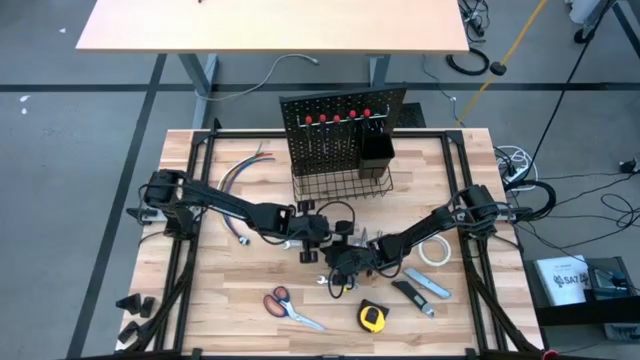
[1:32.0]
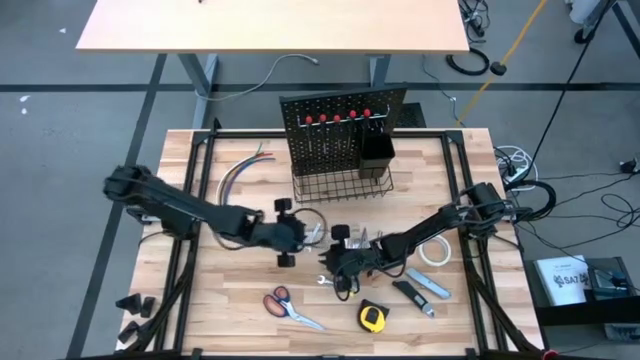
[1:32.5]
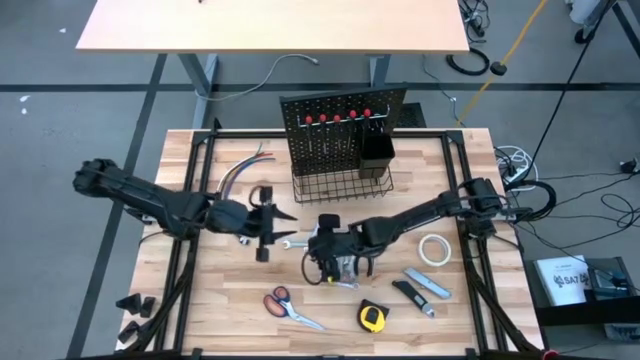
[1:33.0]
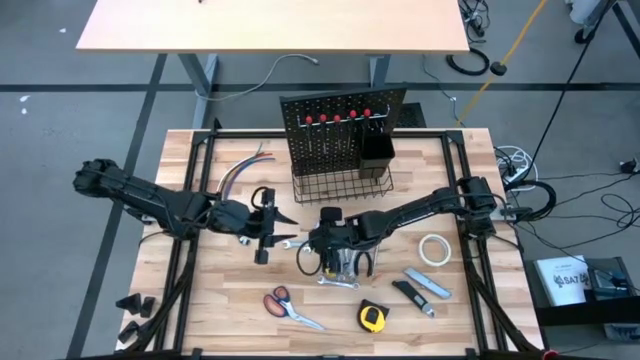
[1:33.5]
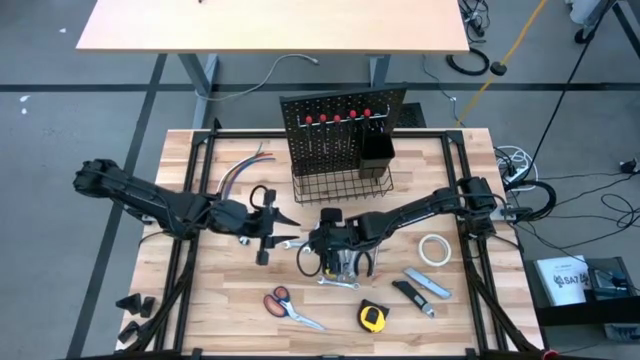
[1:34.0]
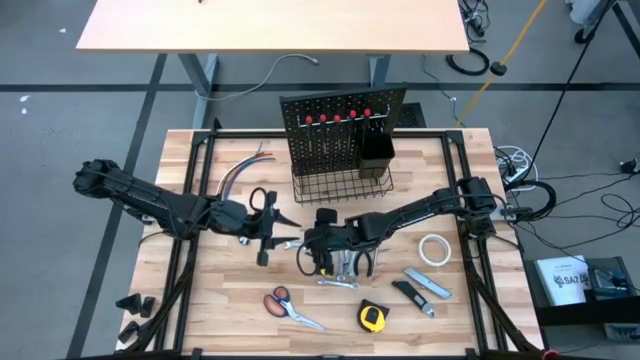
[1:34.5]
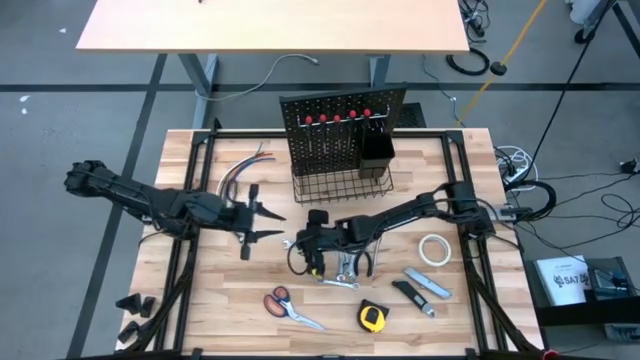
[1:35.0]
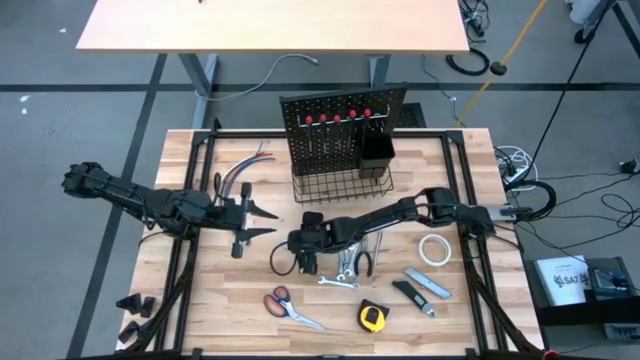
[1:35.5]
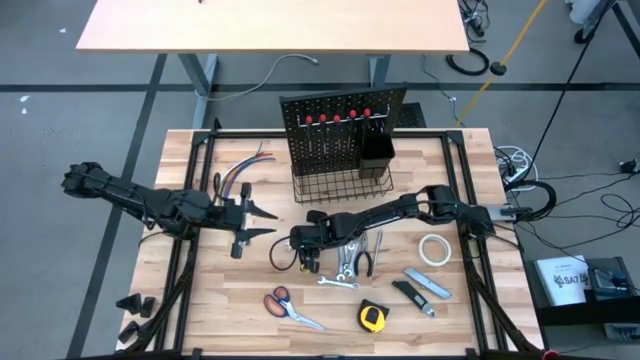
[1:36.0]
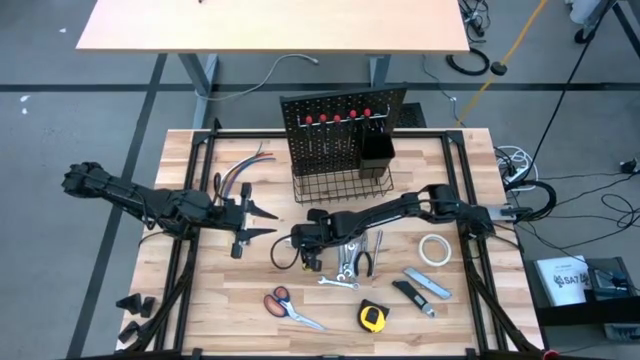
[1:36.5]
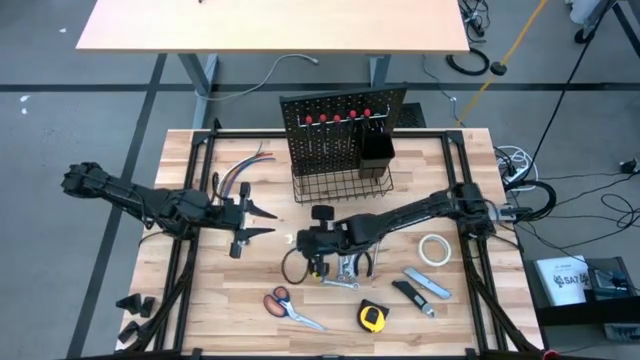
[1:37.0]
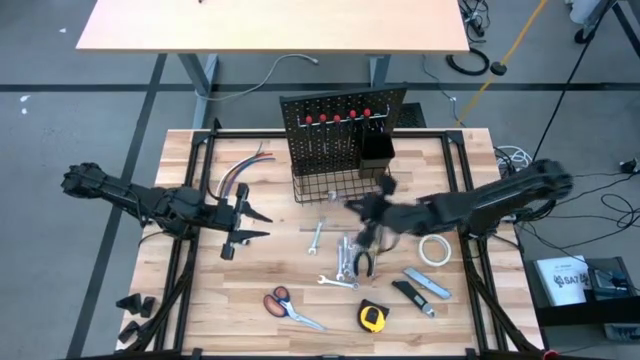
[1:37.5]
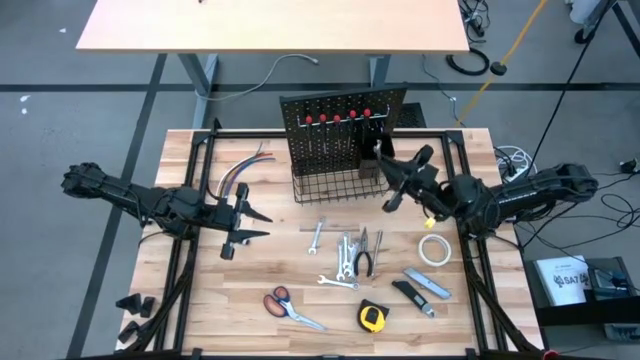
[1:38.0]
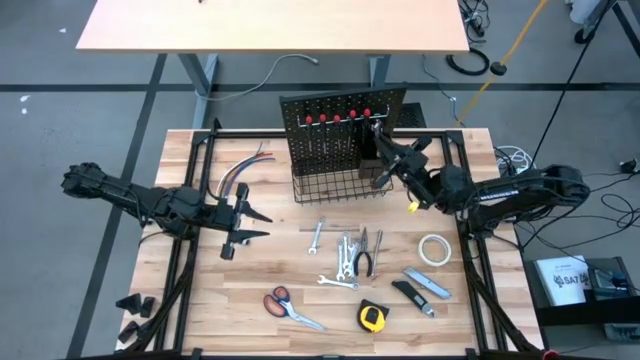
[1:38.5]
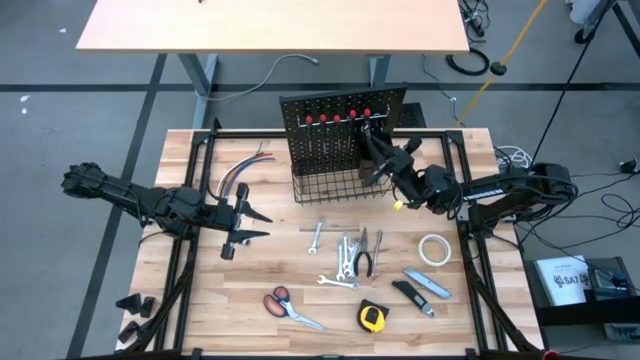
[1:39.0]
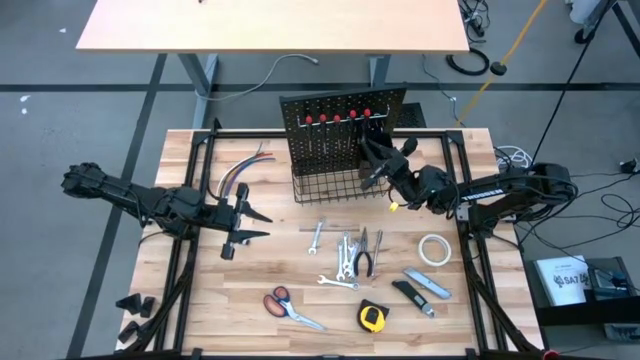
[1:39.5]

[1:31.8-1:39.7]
Task: Hang tools onto peg board
Put the wrench into the black bin on the pegboard

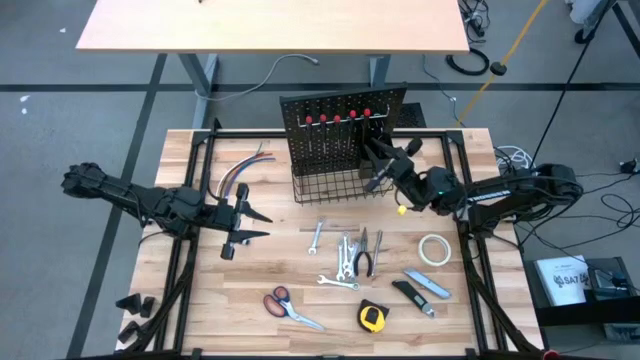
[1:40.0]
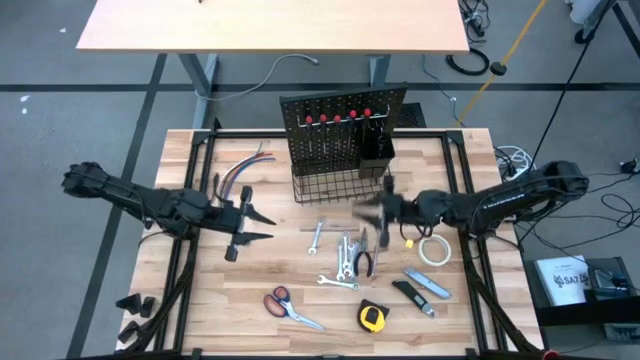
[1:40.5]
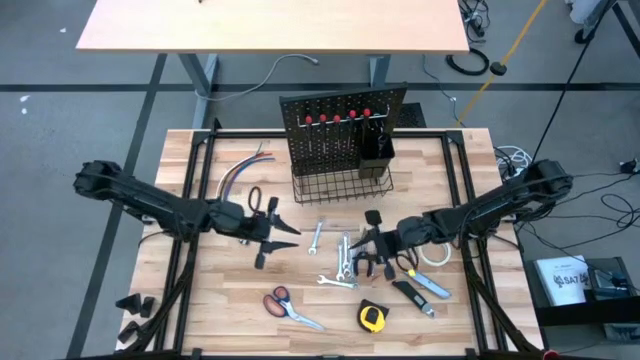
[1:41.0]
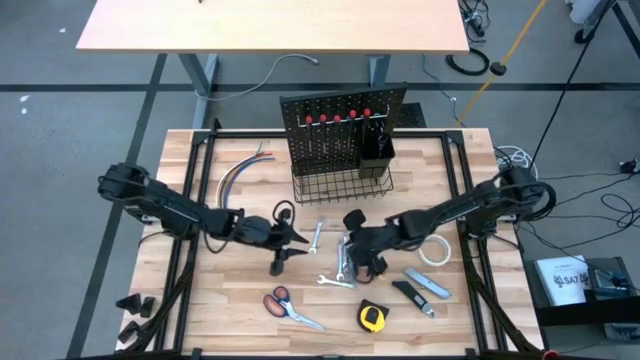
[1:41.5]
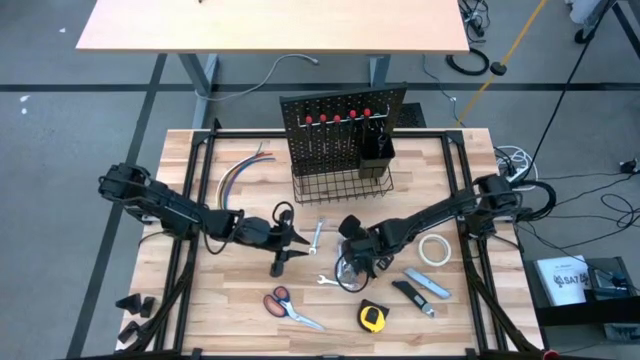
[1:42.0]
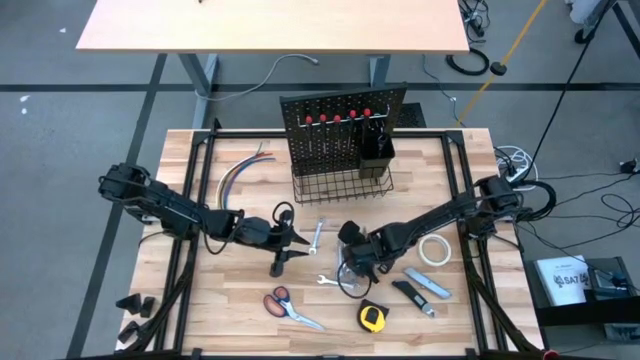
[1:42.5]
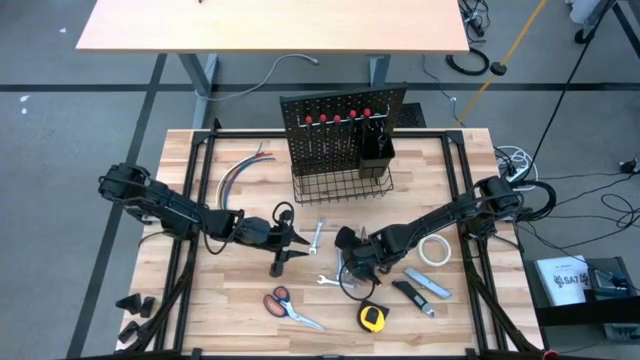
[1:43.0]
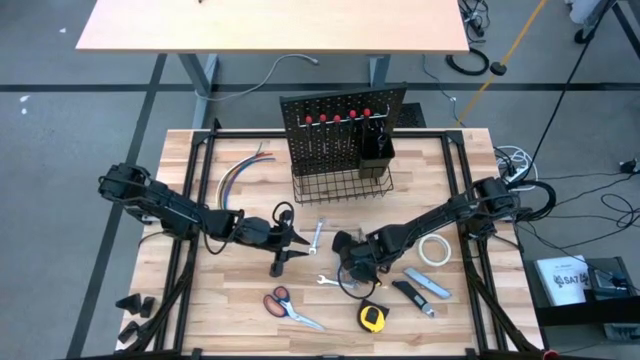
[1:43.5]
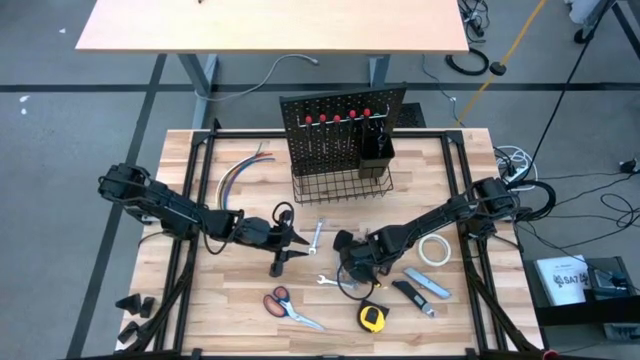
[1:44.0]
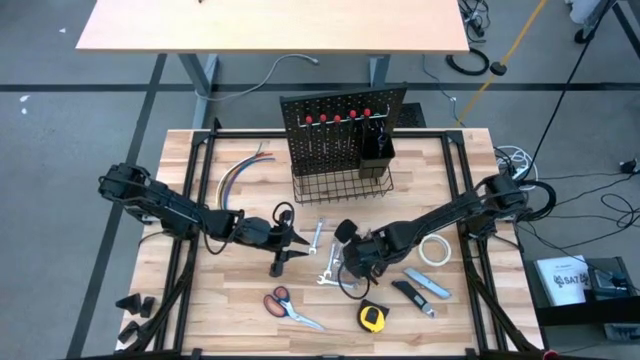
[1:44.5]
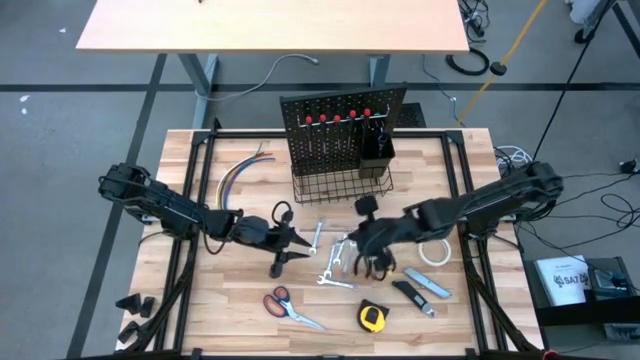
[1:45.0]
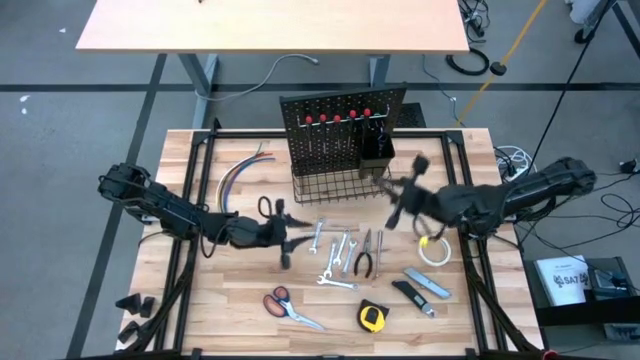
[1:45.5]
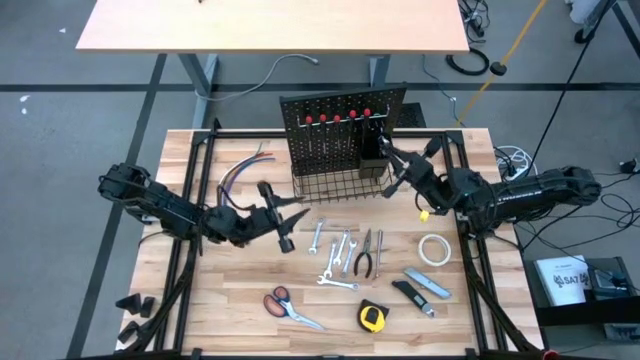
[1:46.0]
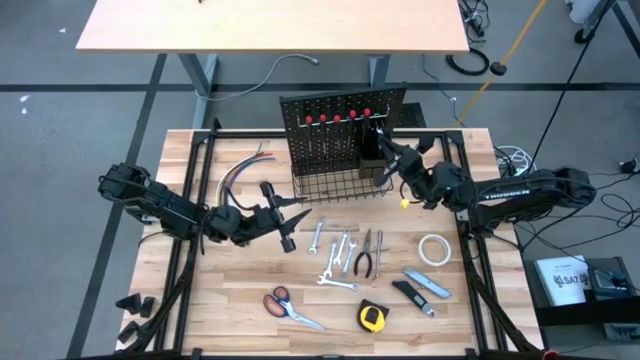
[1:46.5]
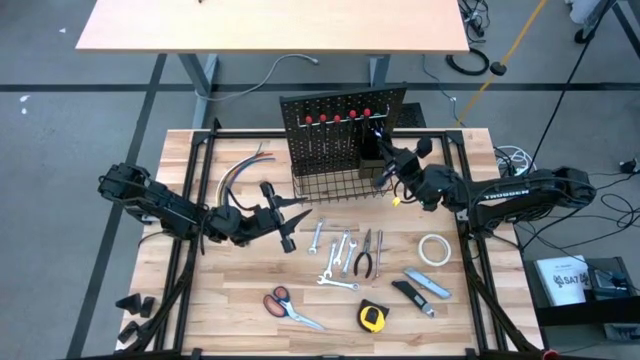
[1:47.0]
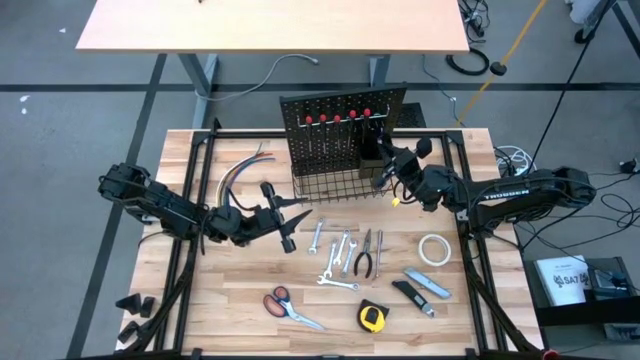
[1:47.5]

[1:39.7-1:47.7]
Put the wrench into the black bin on the pegboard

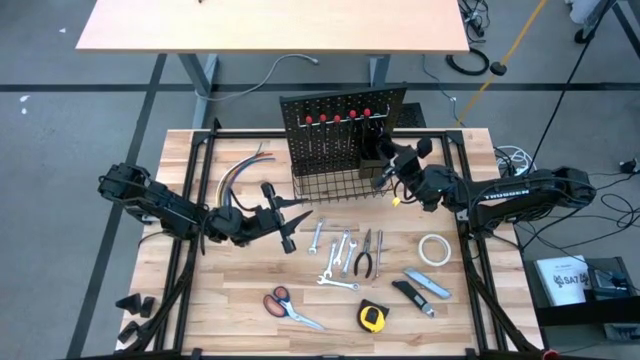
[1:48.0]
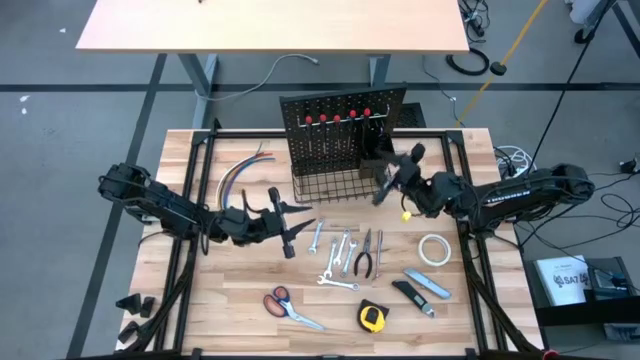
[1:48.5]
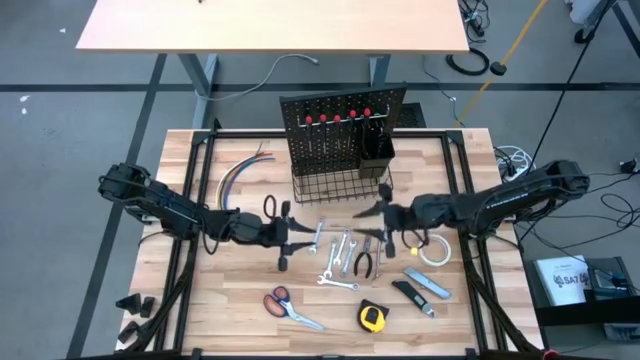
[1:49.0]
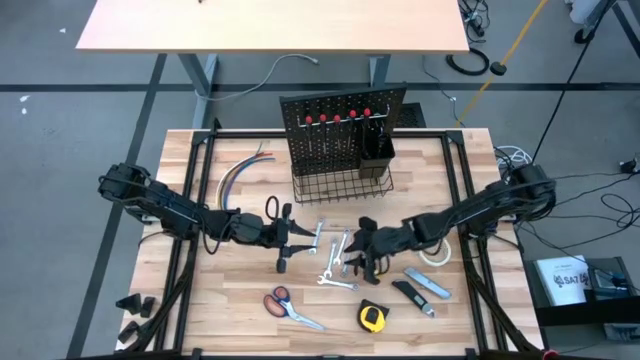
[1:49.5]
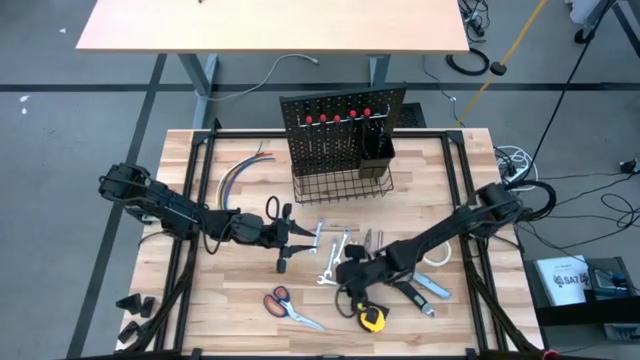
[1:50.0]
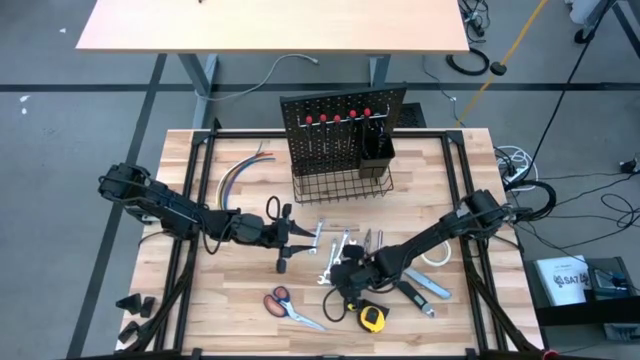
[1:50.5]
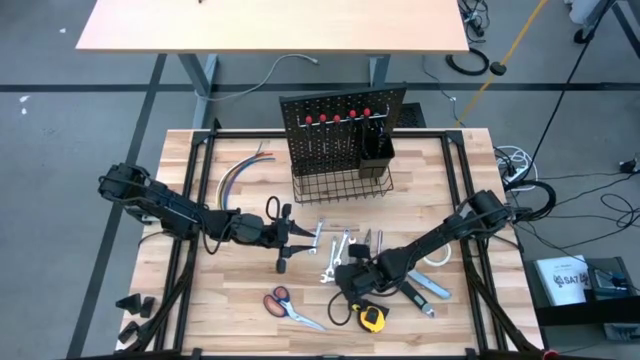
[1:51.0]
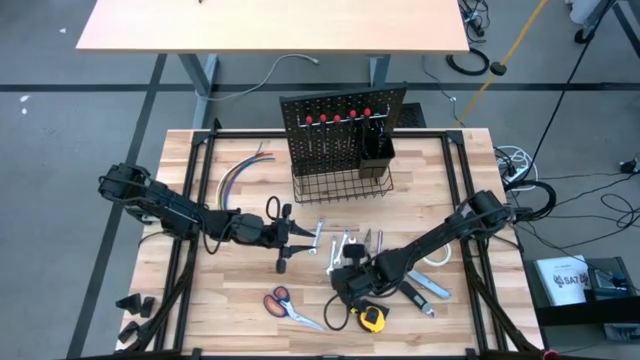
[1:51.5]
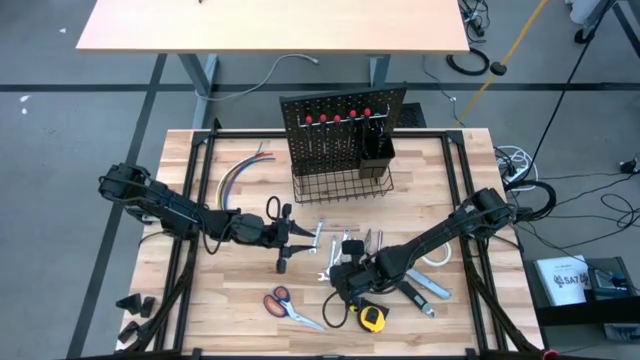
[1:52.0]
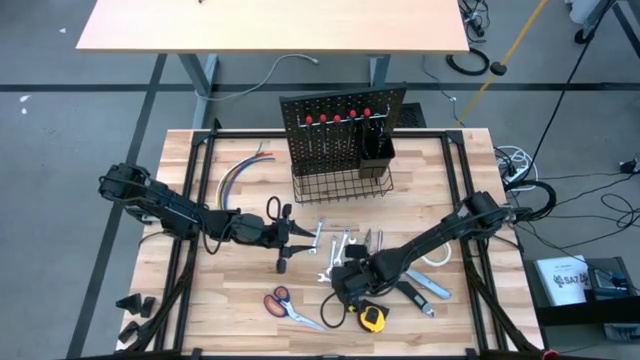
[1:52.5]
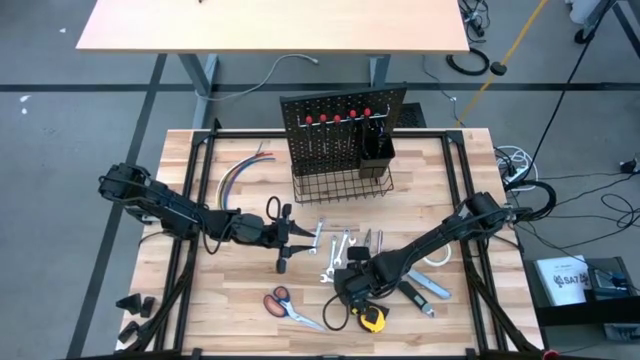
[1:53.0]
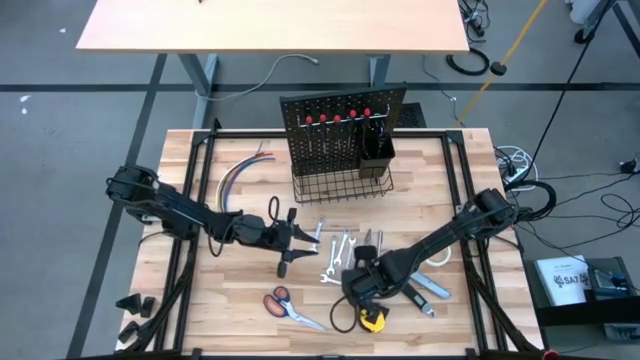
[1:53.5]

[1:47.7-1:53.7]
Put the wrench into the black bin on the pegboard
